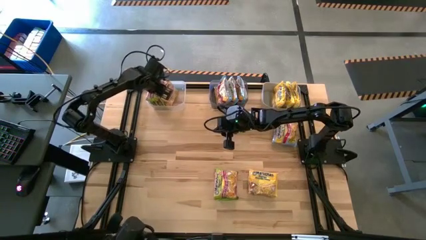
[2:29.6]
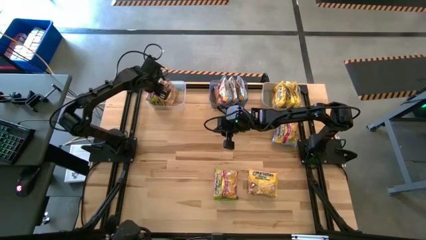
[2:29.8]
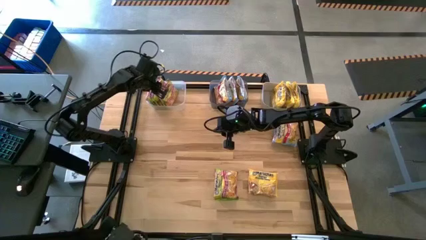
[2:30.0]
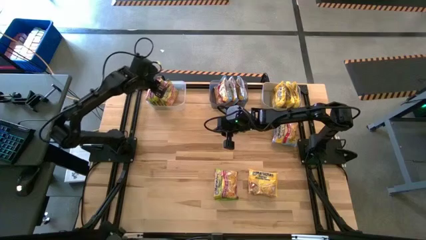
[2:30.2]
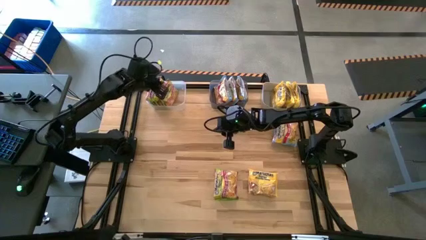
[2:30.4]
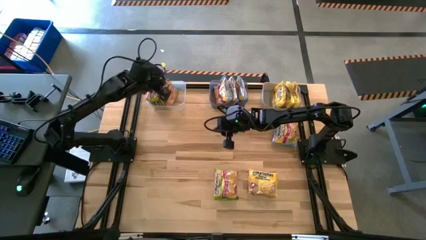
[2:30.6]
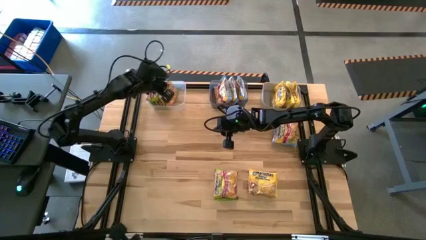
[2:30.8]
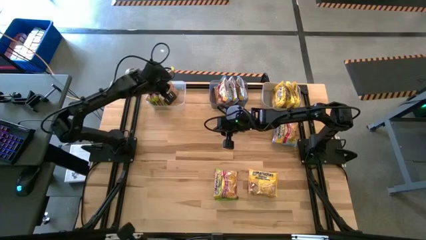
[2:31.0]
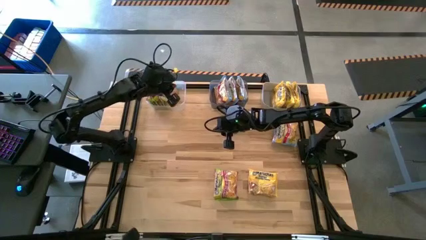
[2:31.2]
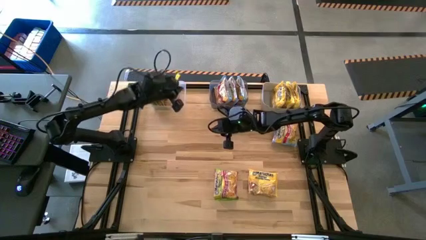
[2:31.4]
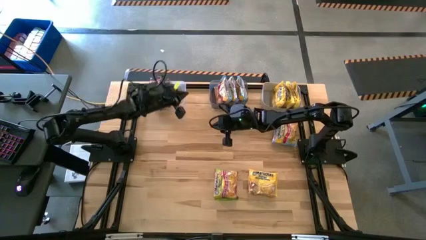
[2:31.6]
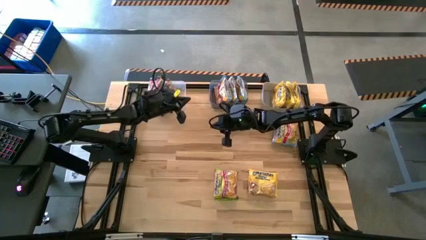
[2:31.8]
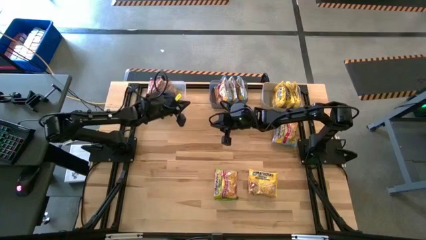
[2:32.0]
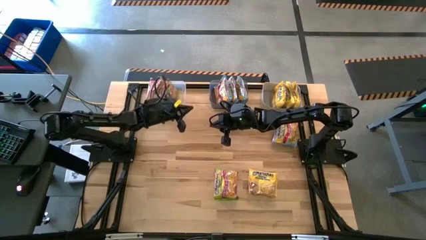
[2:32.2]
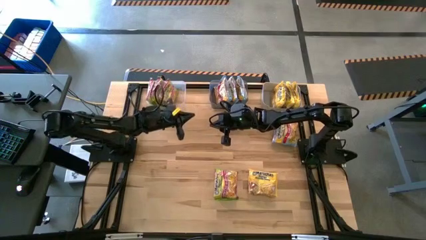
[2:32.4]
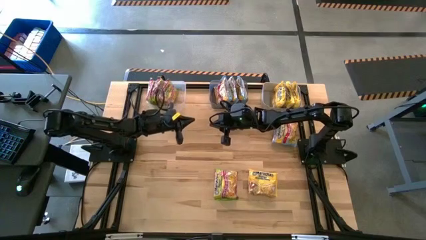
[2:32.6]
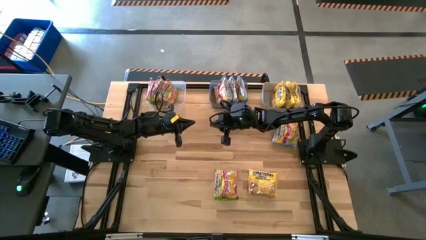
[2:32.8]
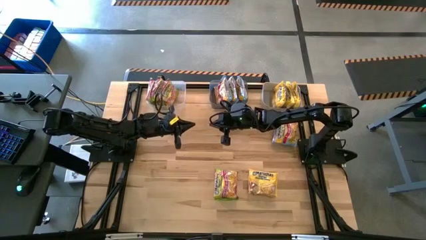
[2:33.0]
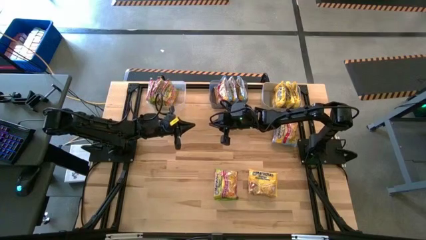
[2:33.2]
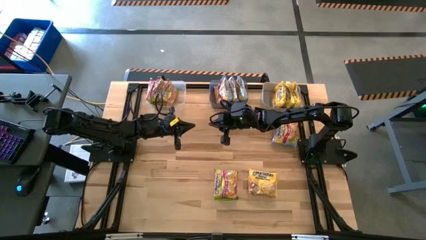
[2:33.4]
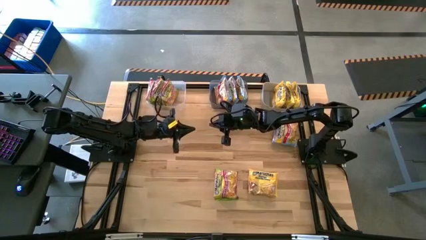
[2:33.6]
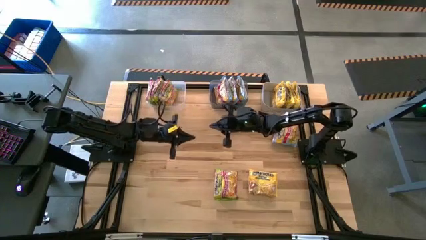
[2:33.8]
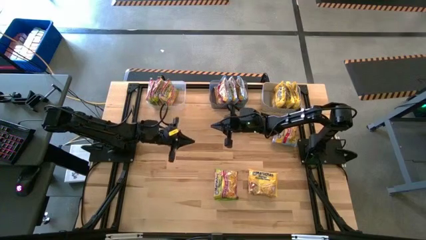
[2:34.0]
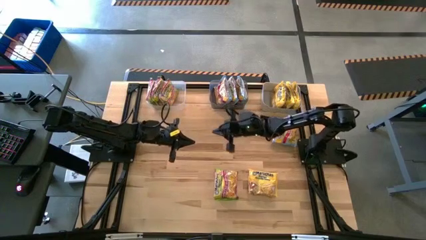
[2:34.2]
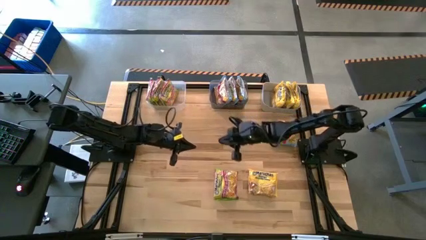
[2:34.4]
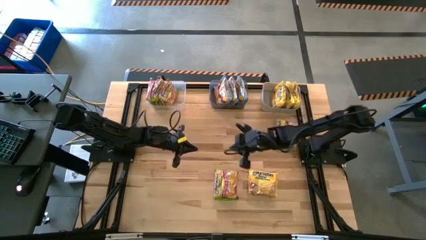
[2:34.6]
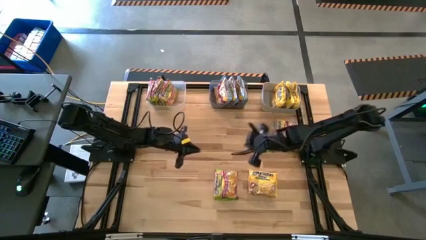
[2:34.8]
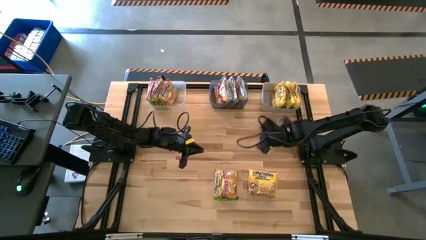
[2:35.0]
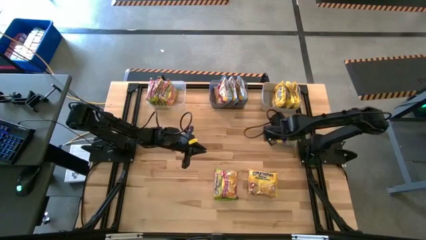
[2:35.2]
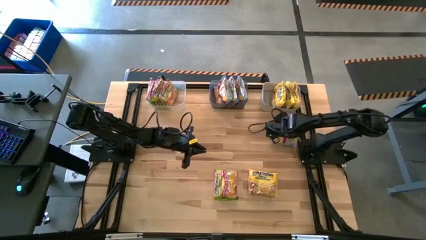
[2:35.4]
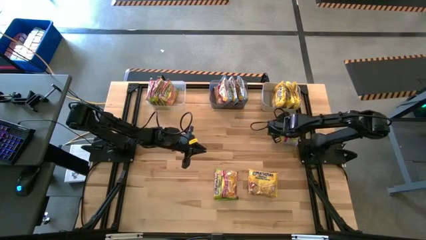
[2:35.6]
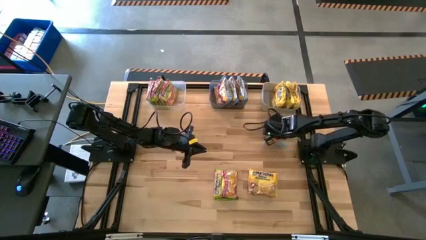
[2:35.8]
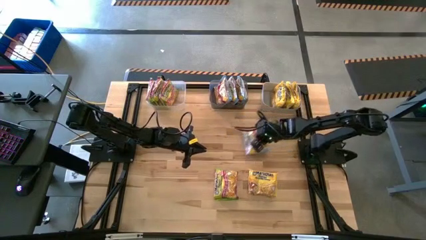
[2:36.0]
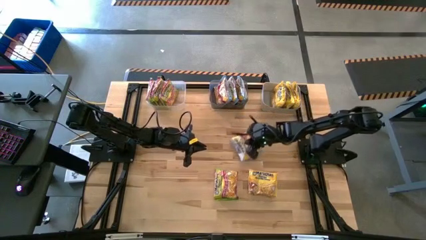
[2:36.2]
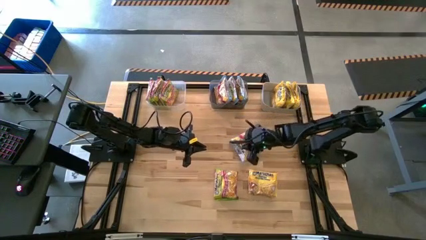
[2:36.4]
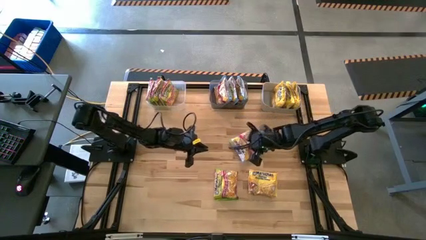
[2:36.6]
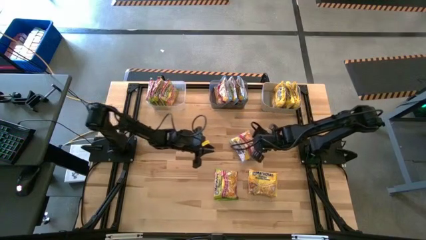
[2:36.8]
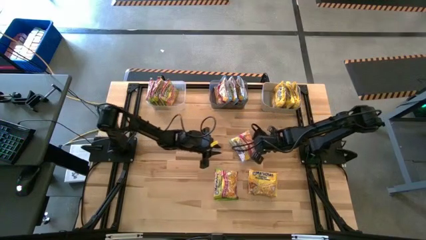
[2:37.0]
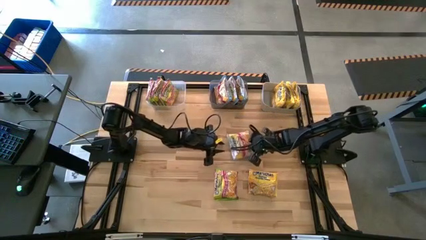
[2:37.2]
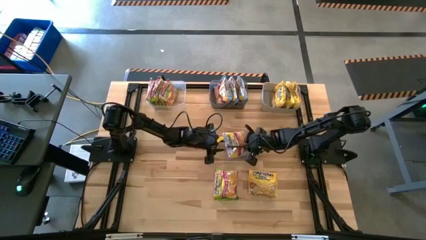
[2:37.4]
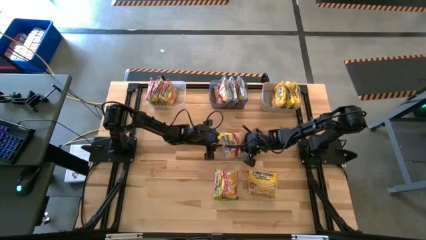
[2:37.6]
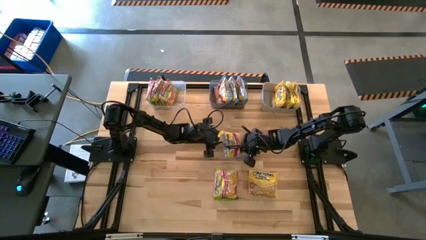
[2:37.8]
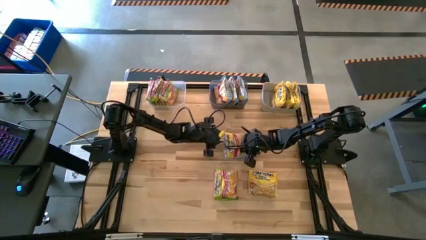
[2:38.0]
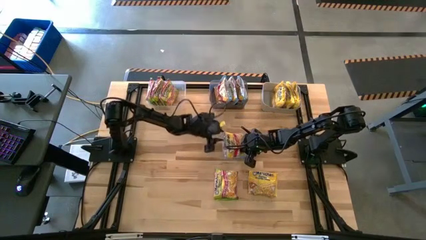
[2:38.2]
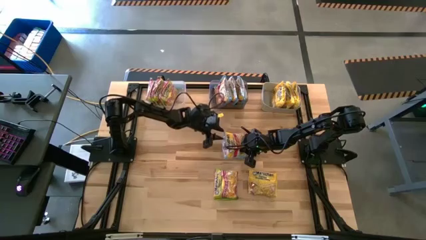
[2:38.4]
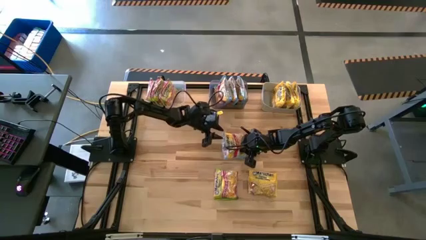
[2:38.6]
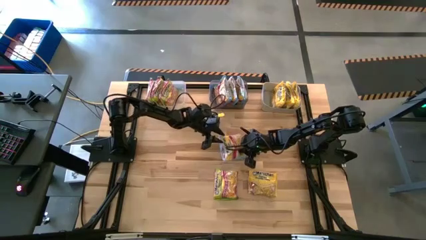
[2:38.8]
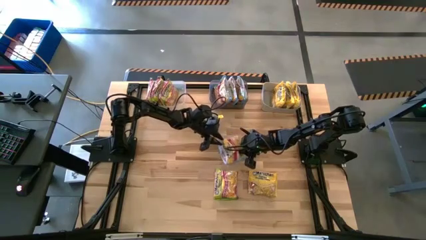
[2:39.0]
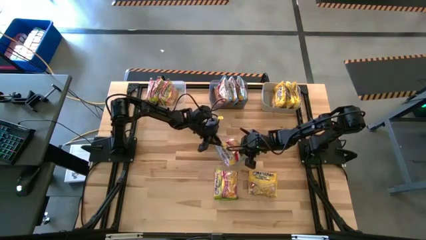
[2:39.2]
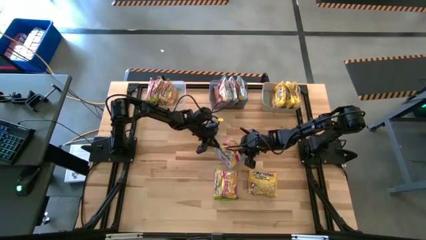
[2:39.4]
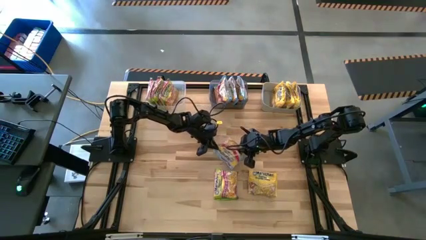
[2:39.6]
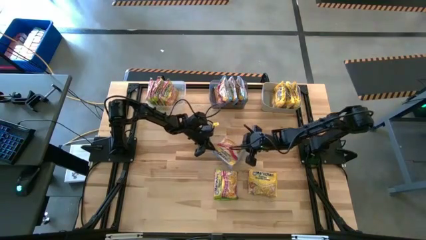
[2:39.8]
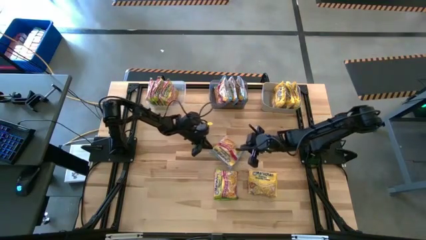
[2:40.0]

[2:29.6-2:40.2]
Task: Sort Maruchan noodles
Put the blue noodle pack into the black bin

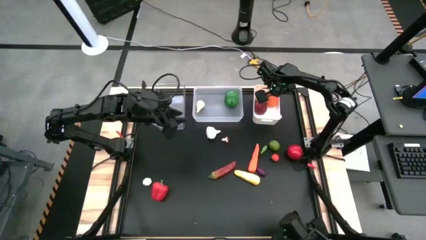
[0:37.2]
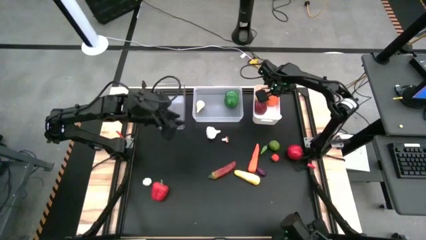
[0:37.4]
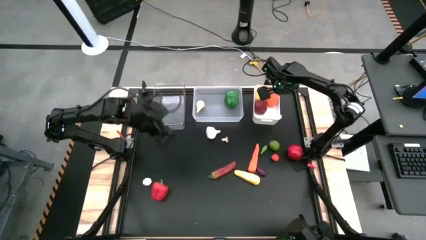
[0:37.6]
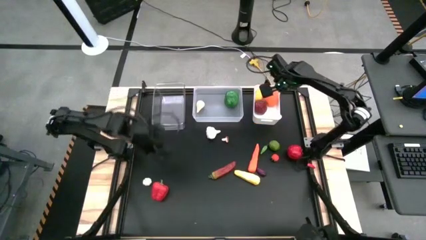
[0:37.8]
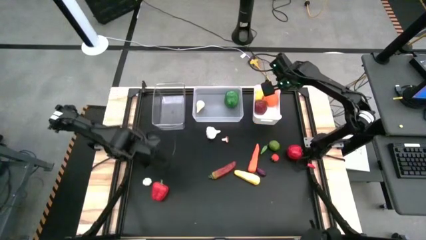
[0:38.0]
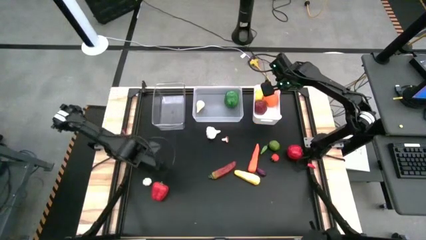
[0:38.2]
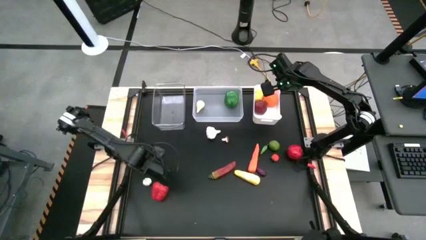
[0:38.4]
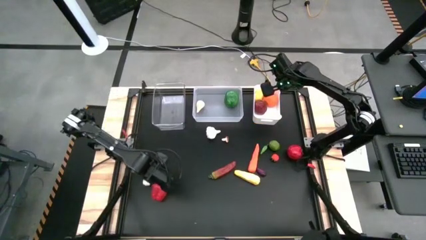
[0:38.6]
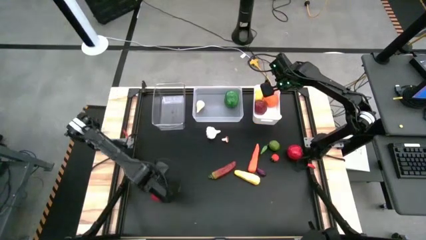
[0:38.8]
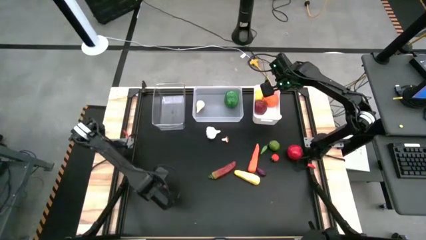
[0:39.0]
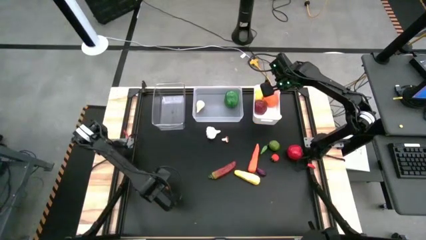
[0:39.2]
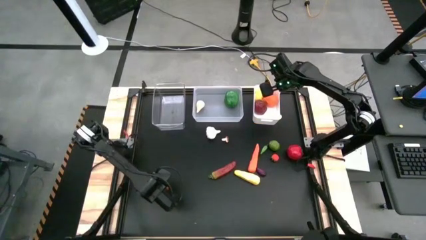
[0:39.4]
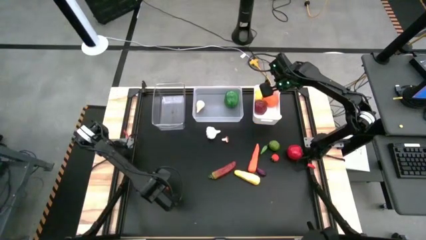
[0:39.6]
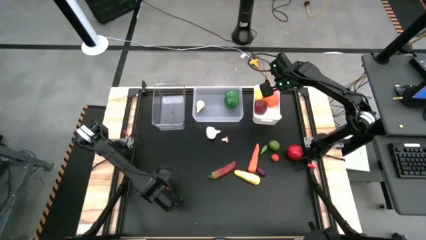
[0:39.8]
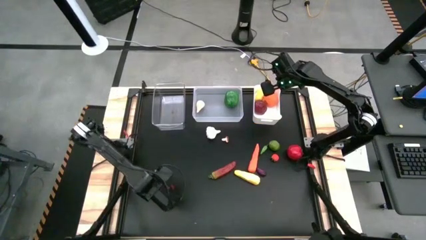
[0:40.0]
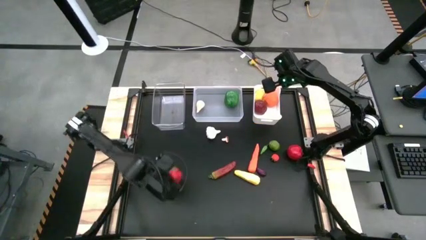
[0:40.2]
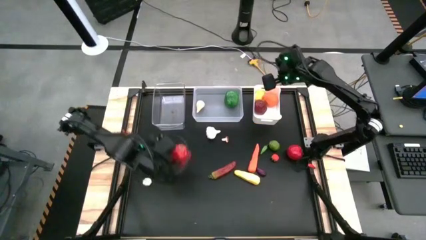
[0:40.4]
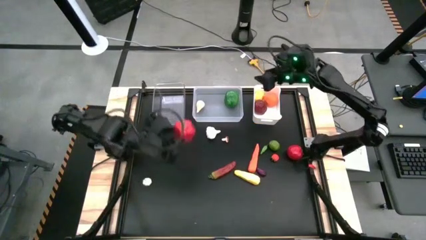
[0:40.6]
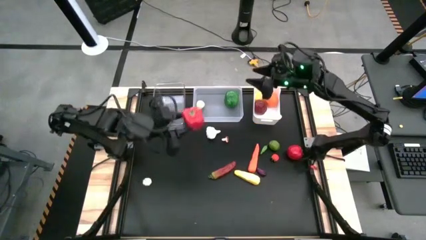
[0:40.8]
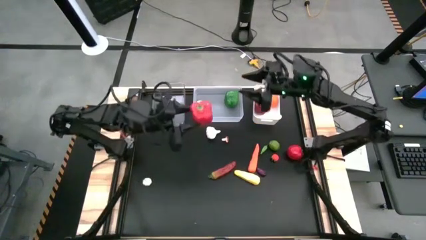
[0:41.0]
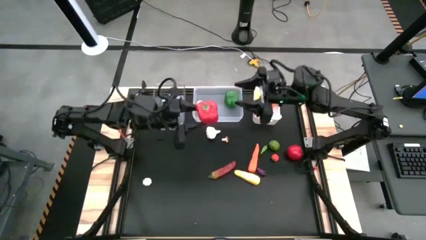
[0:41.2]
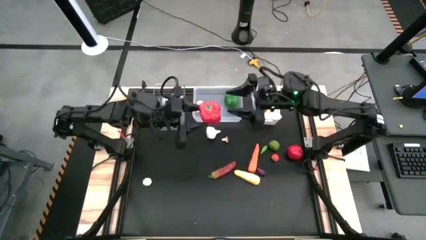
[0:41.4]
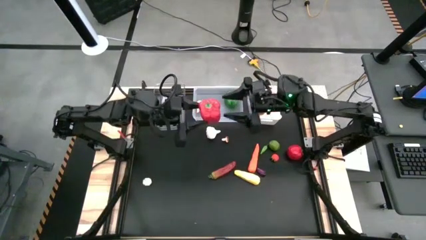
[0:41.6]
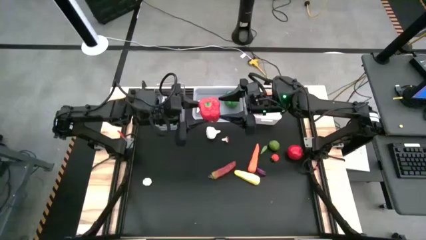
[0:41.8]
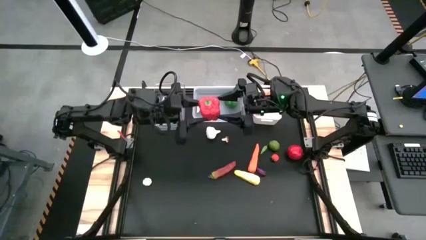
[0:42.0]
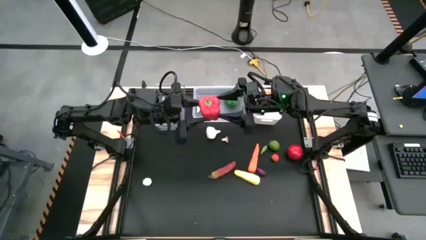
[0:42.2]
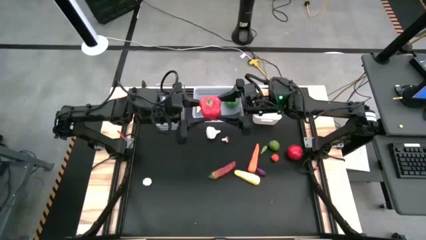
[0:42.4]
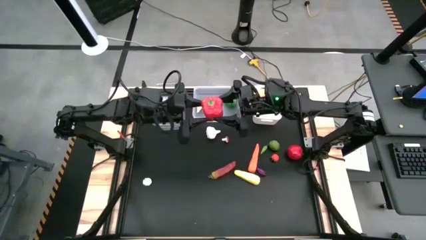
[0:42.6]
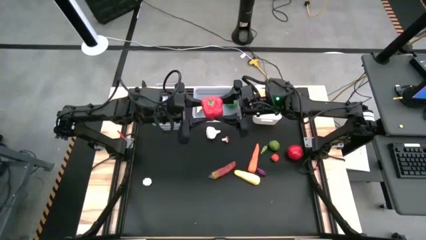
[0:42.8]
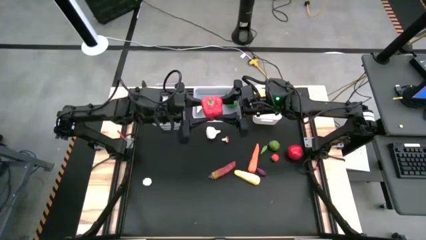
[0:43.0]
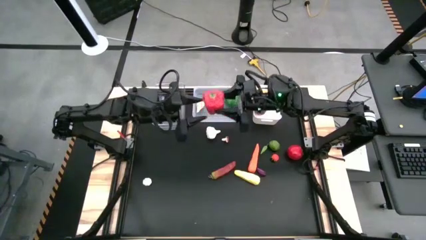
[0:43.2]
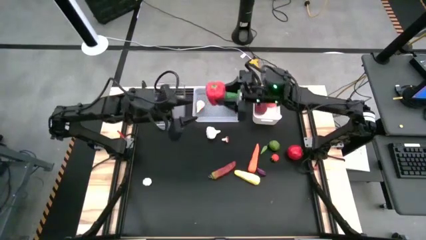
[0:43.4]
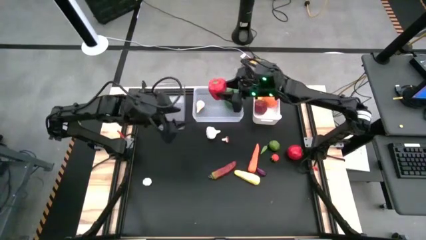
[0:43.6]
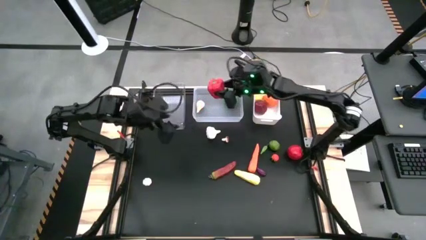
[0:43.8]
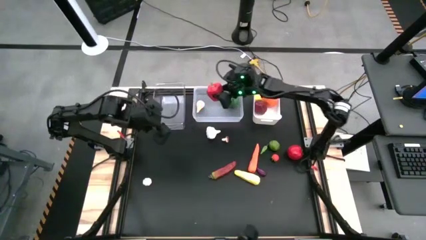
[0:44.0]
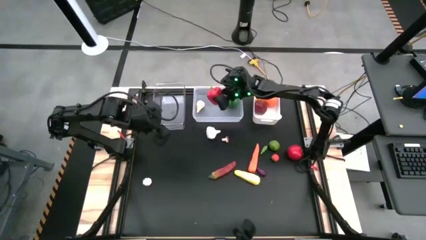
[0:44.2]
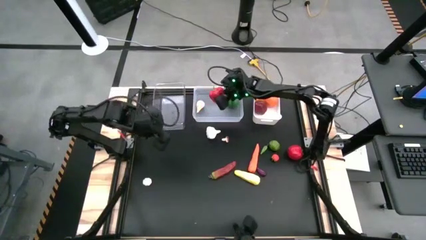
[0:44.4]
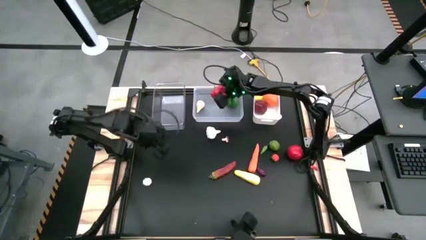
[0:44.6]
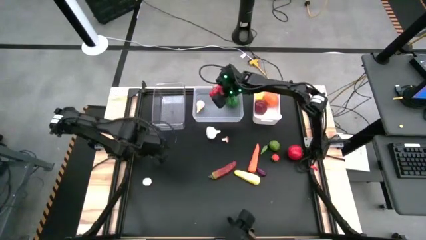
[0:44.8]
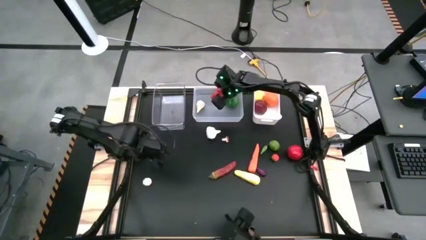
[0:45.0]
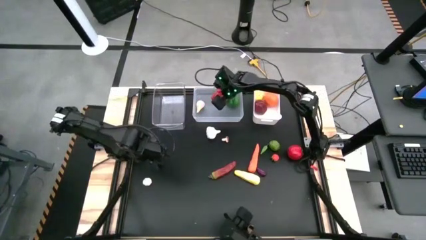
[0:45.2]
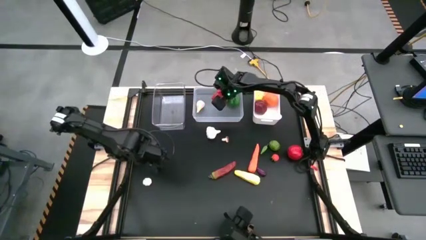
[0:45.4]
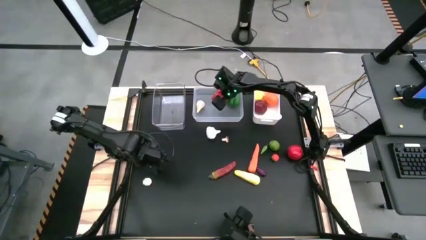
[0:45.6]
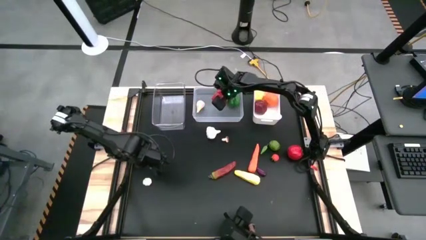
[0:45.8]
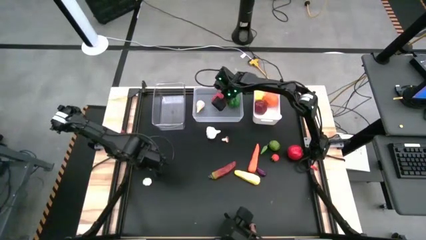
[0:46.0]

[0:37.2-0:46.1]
Task: Sort produce into baskets
Put the red bell pepper into the transparent bin
